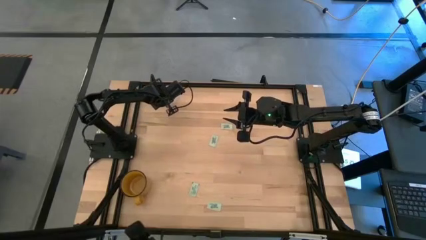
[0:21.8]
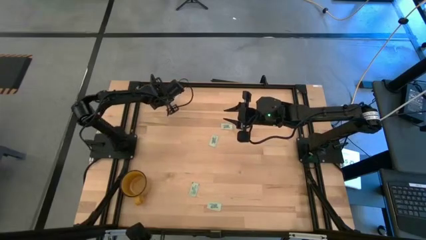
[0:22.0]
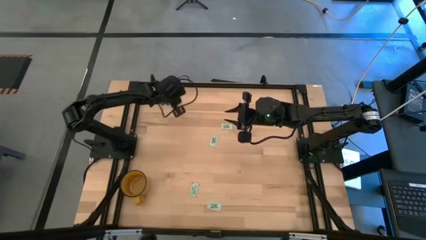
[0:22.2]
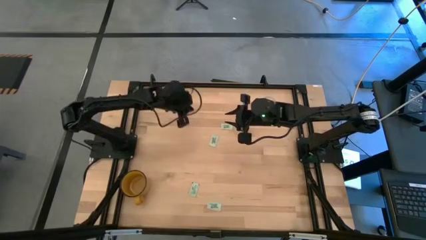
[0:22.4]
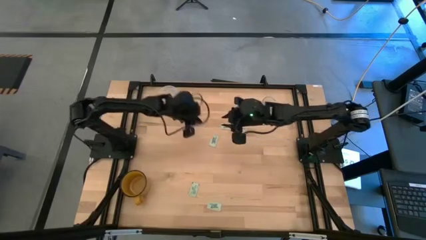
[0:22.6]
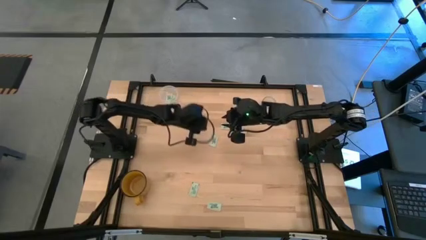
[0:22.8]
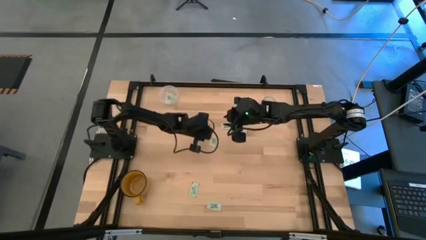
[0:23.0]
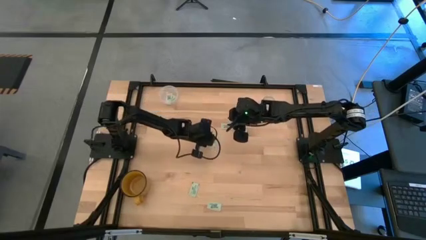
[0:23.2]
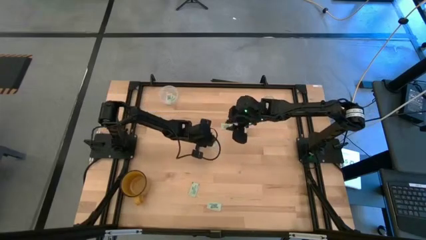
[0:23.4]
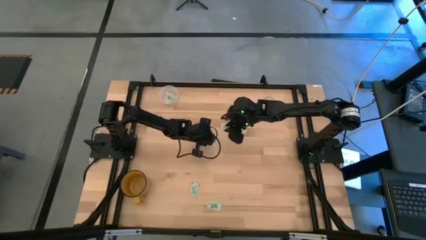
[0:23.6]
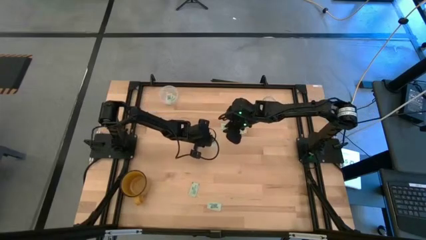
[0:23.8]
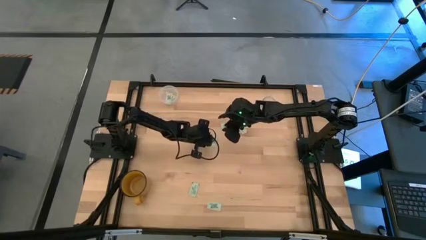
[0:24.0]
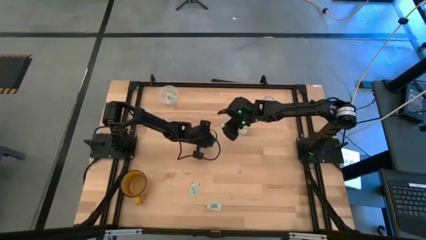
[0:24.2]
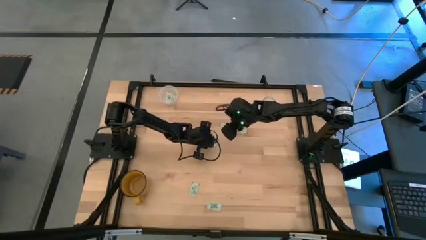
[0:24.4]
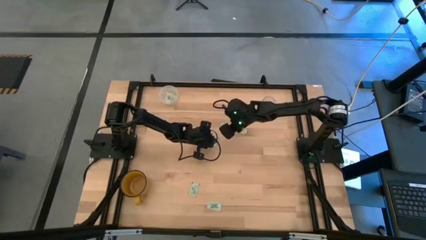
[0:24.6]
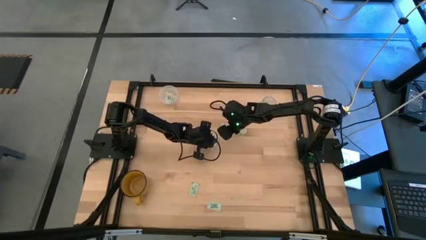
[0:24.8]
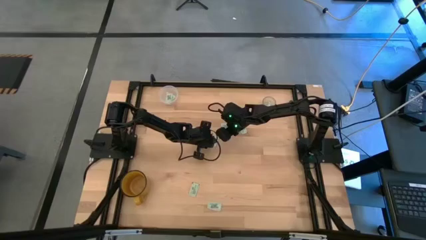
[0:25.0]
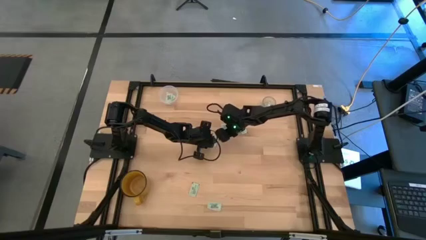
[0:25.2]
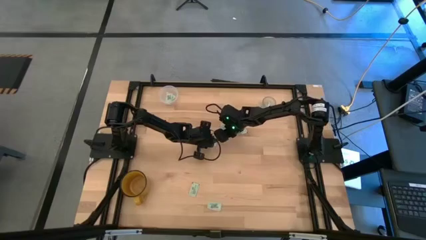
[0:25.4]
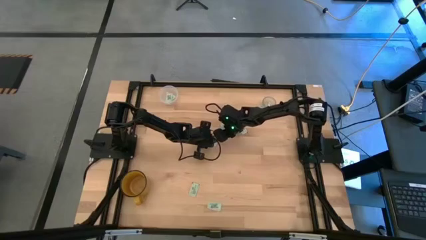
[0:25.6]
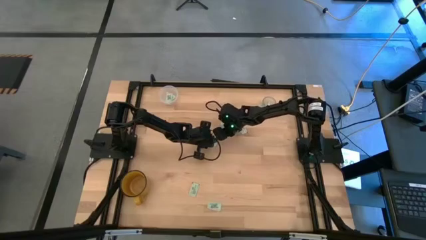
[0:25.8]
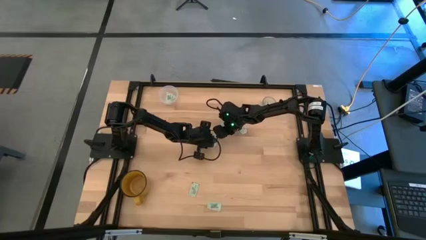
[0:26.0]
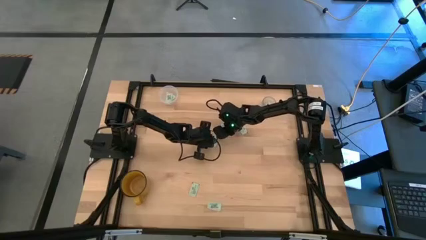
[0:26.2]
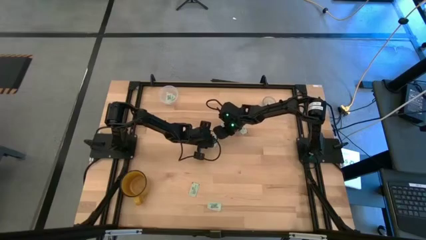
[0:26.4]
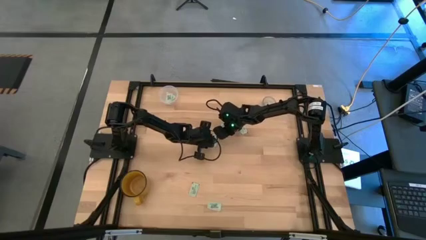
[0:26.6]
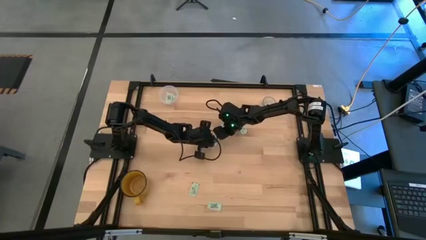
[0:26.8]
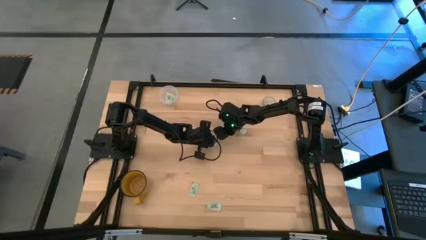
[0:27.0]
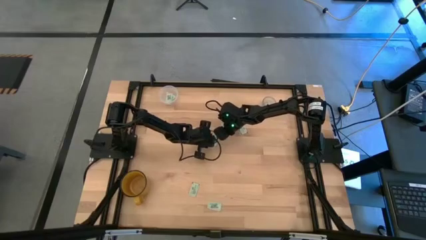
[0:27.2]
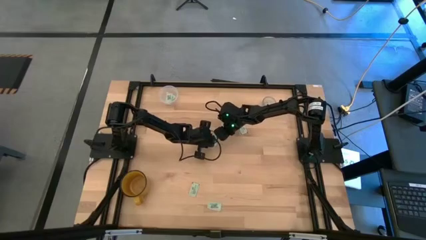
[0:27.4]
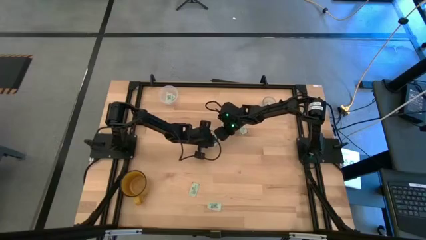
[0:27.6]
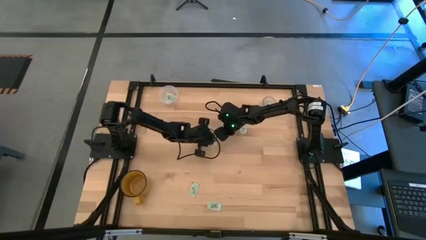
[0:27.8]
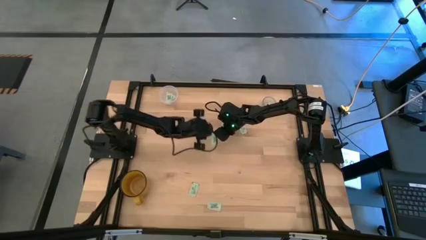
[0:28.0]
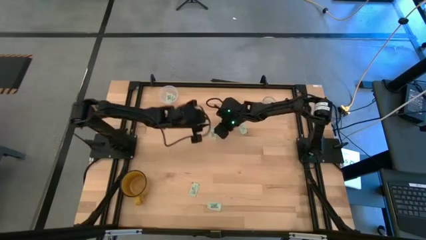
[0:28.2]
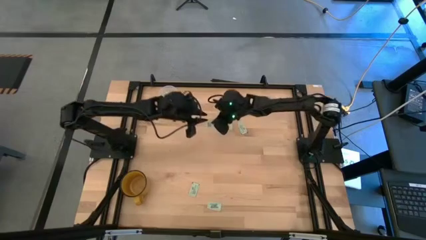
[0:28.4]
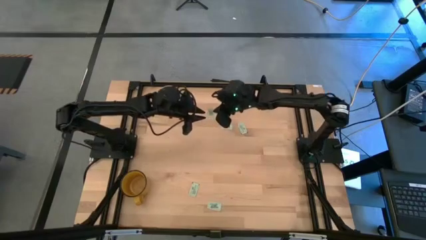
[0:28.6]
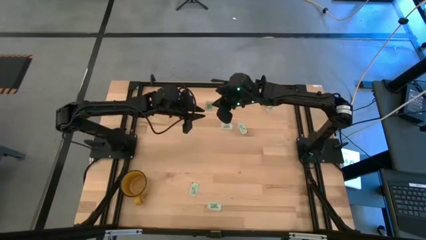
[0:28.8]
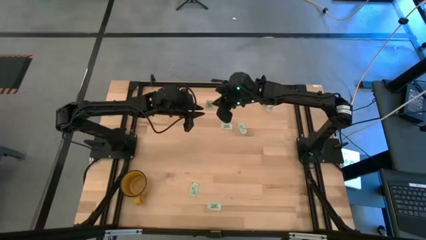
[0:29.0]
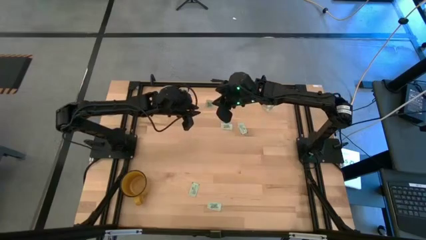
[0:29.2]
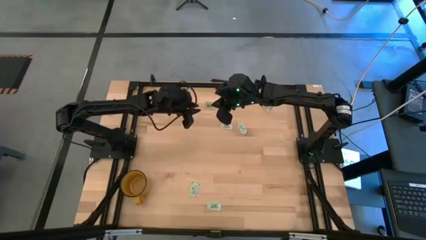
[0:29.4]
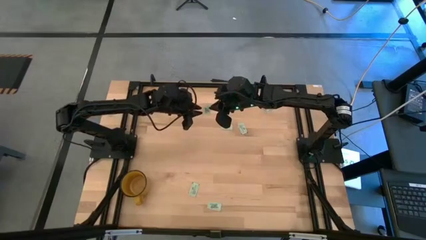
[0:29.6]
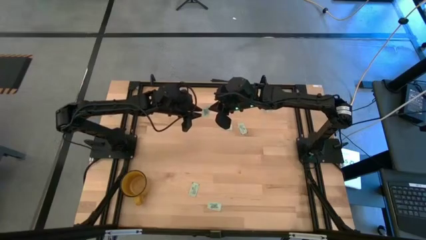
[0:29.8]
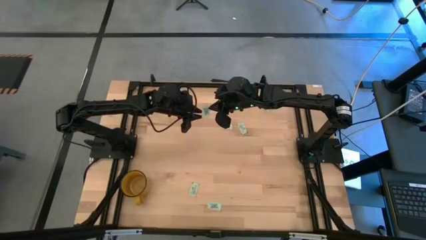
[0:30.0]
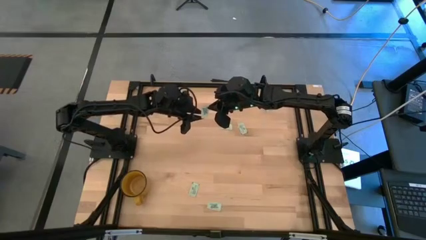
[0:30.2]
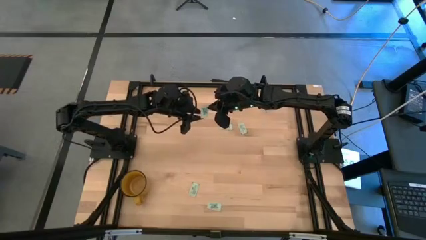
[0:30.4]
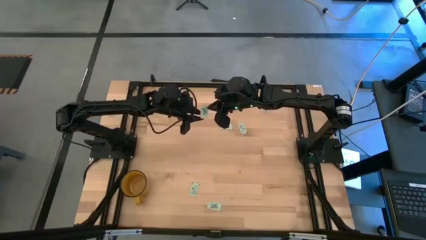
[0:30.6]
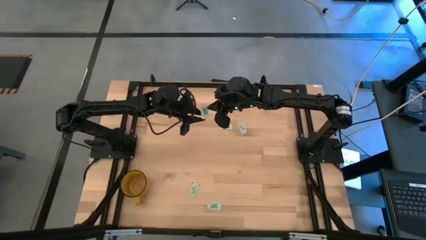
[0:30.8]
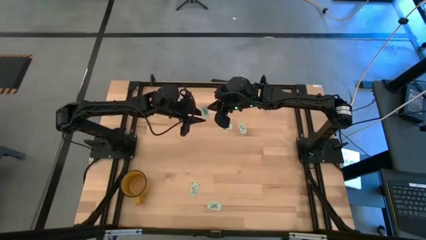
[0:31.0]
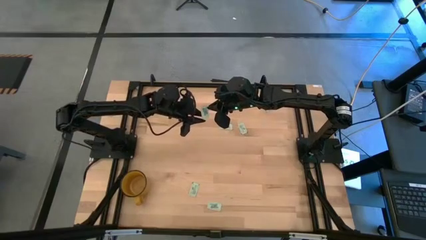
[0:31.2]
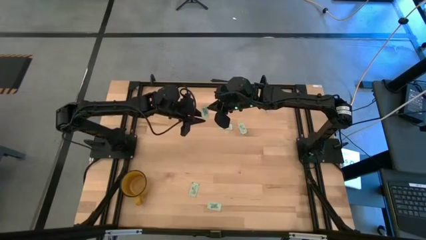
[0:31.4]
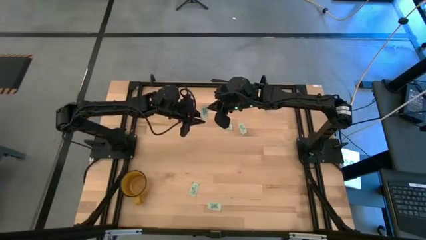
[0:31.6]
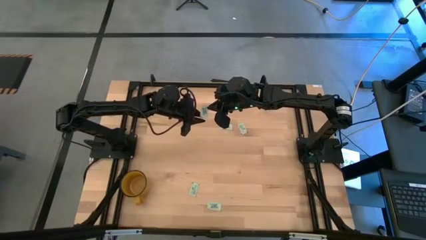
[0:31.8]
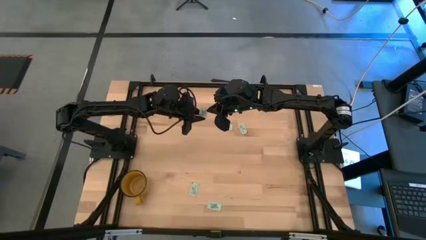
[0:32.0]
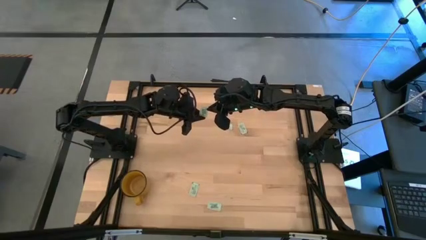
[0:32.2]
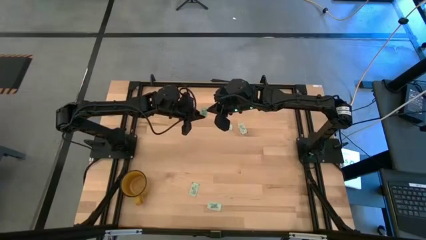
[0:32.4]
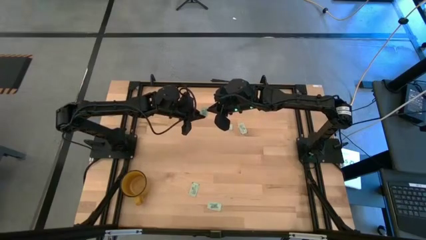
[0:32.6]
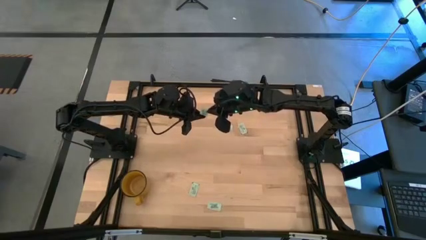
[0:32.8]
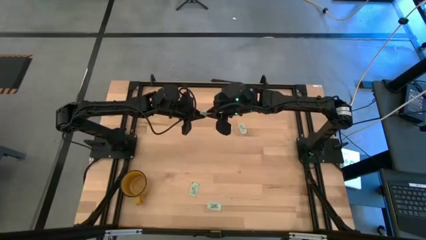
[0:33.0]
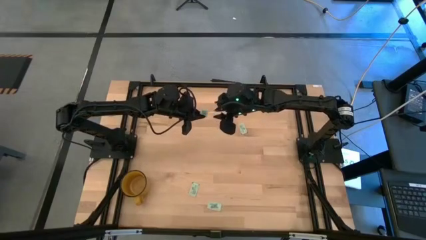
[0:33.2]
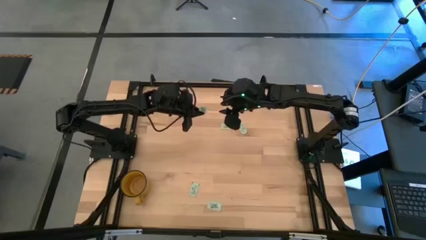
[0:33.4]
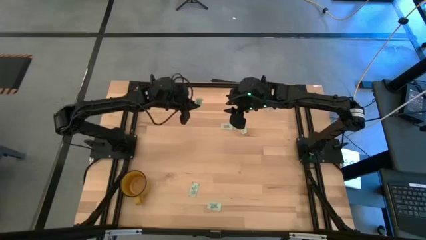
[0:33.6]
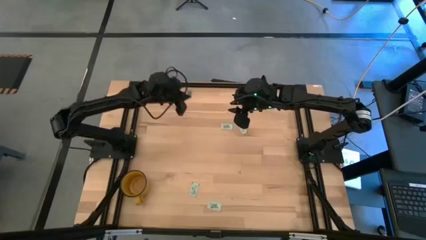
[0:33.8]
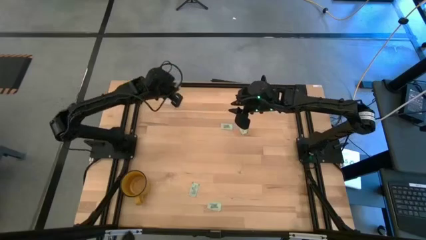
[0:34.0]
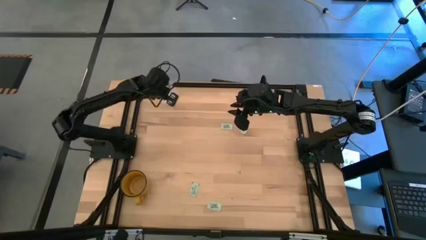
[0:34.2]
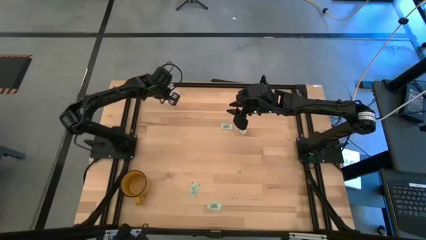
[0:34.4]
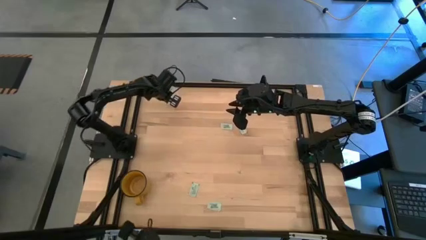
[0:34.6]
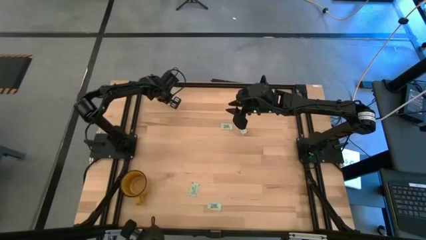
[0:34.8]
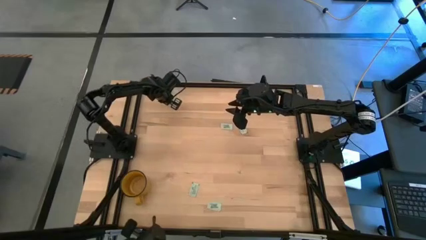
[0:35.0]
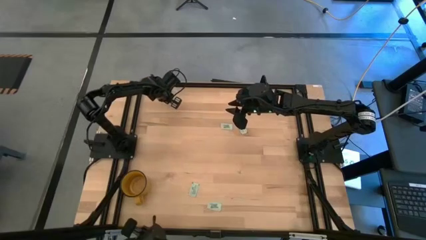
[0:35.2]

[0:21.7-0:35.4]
Task: Pick and place Stevia / Truvia into bins
Put the green stevia packet into the transparent container
